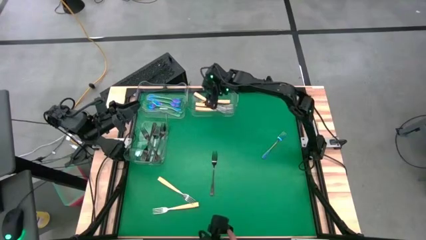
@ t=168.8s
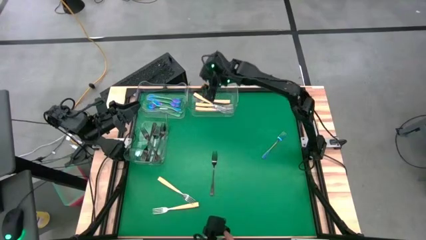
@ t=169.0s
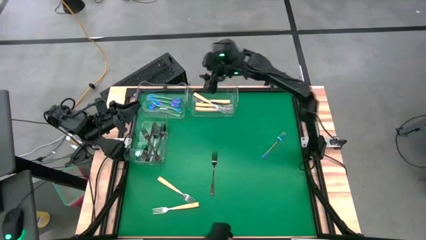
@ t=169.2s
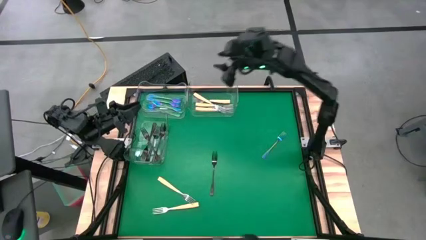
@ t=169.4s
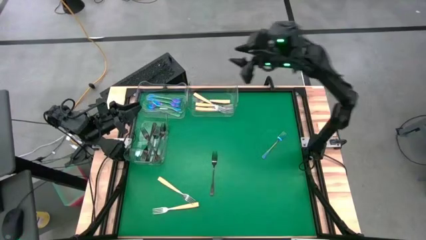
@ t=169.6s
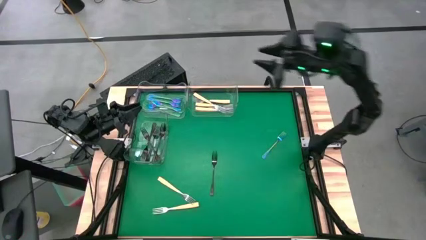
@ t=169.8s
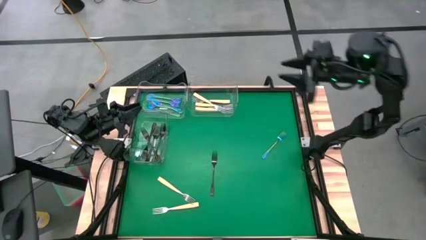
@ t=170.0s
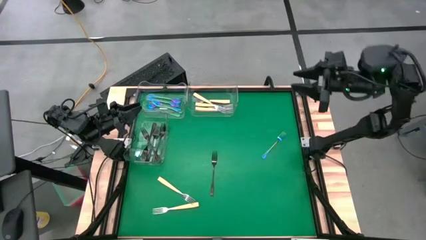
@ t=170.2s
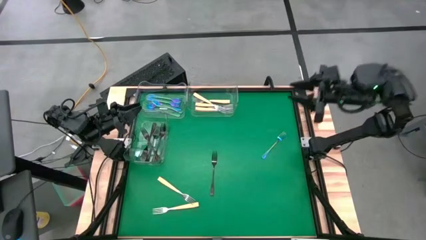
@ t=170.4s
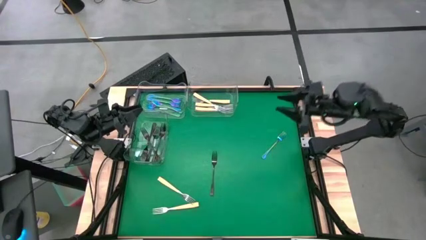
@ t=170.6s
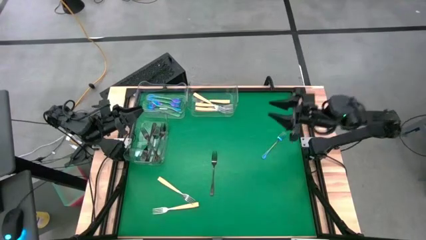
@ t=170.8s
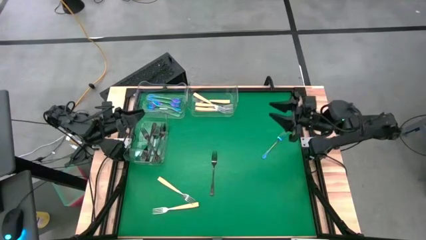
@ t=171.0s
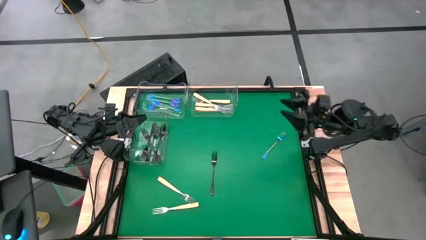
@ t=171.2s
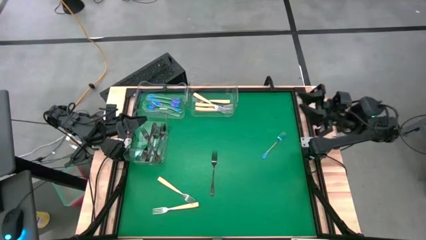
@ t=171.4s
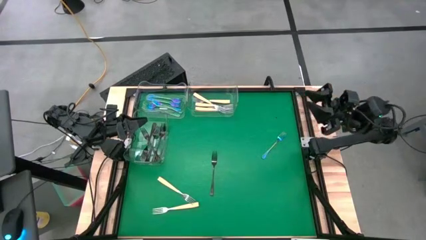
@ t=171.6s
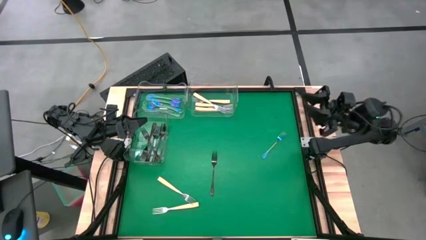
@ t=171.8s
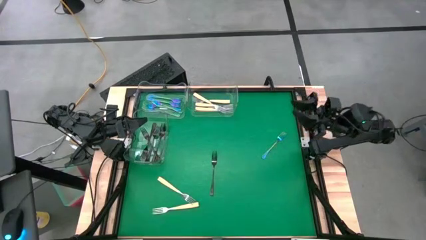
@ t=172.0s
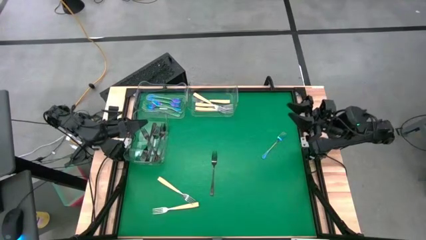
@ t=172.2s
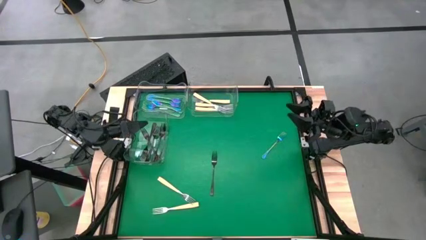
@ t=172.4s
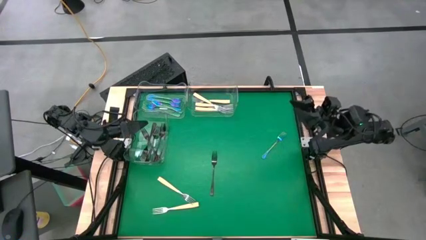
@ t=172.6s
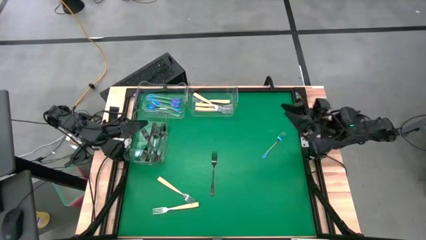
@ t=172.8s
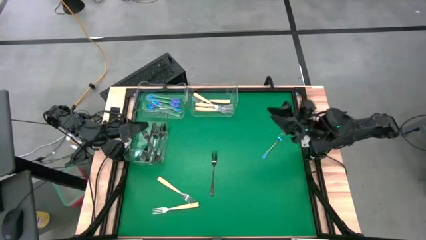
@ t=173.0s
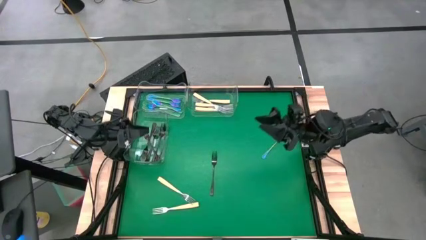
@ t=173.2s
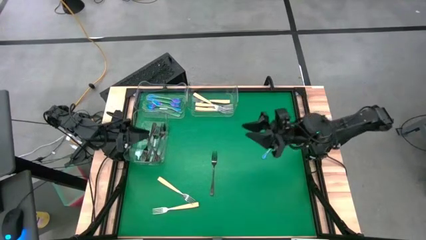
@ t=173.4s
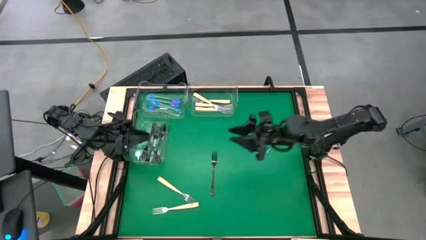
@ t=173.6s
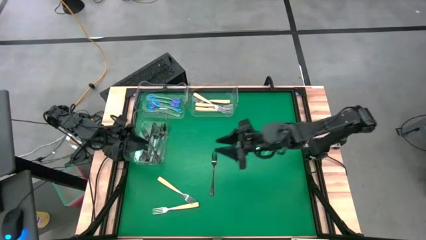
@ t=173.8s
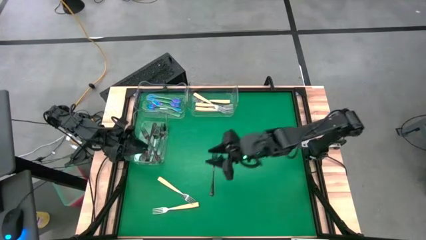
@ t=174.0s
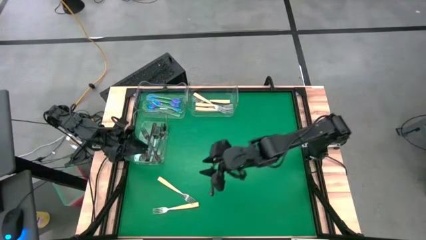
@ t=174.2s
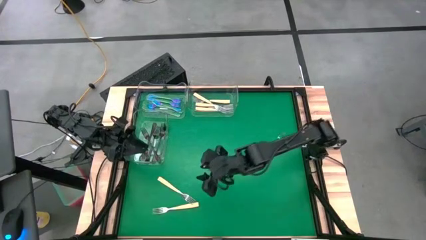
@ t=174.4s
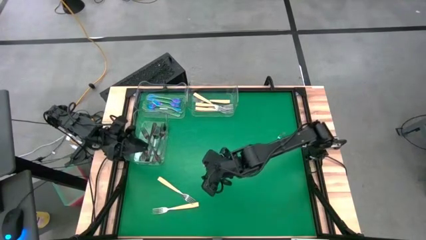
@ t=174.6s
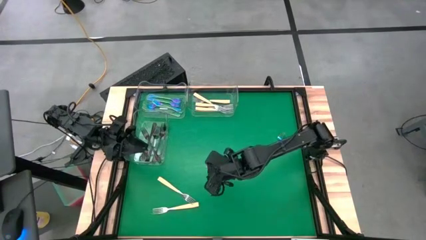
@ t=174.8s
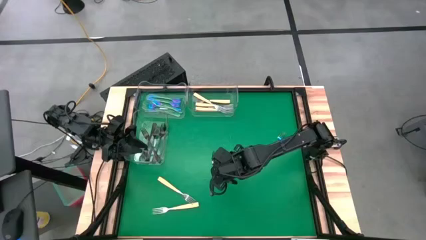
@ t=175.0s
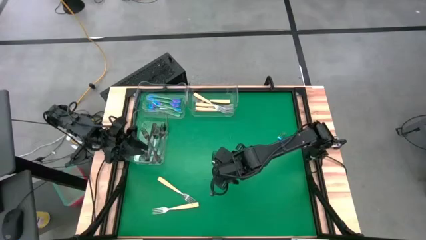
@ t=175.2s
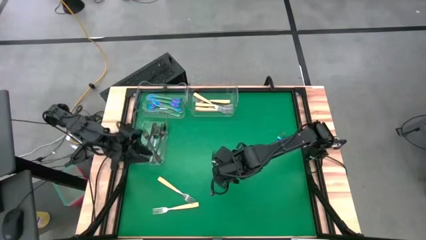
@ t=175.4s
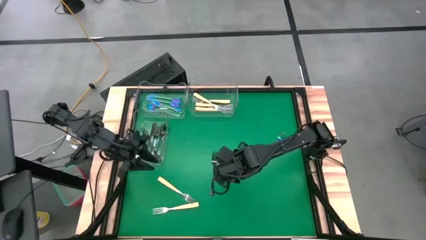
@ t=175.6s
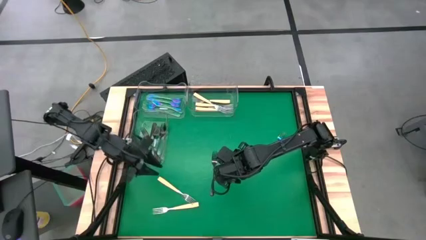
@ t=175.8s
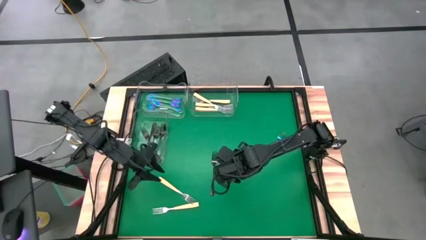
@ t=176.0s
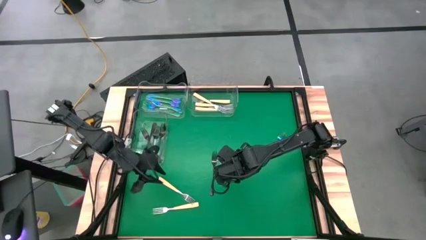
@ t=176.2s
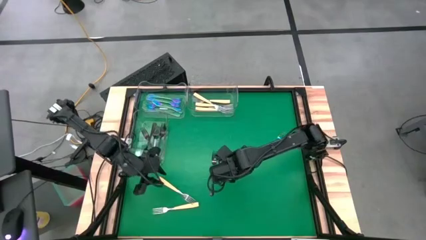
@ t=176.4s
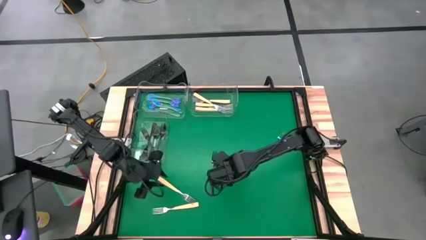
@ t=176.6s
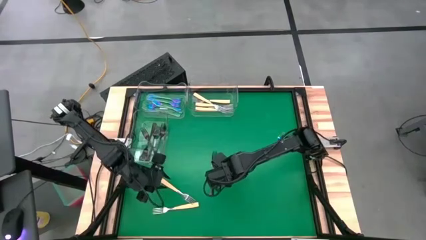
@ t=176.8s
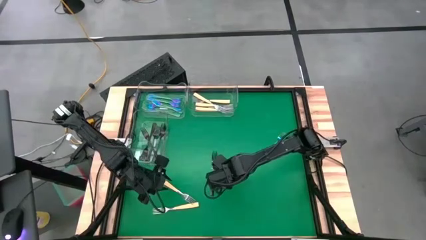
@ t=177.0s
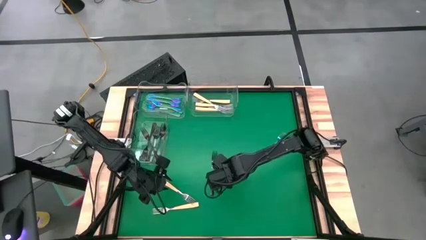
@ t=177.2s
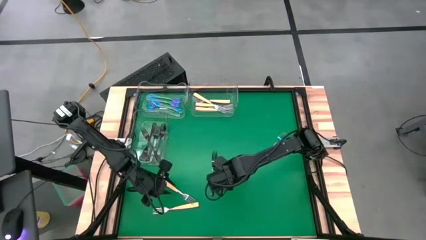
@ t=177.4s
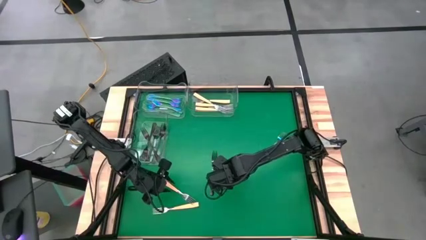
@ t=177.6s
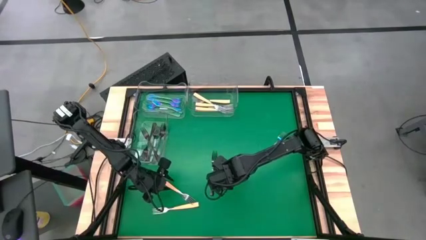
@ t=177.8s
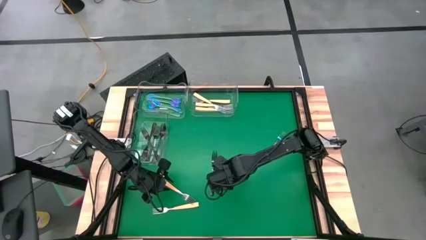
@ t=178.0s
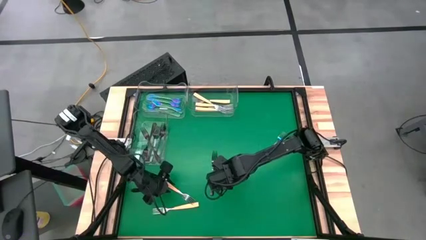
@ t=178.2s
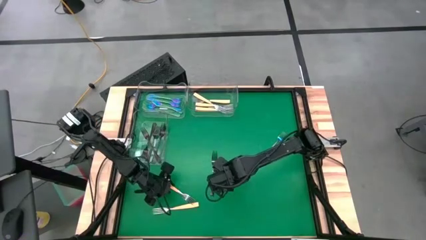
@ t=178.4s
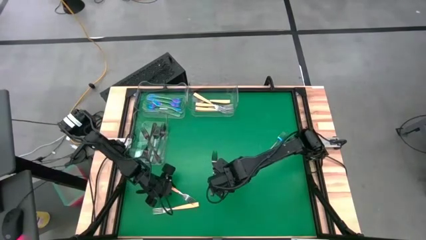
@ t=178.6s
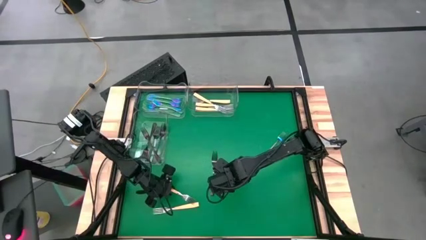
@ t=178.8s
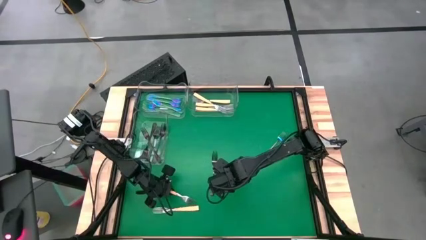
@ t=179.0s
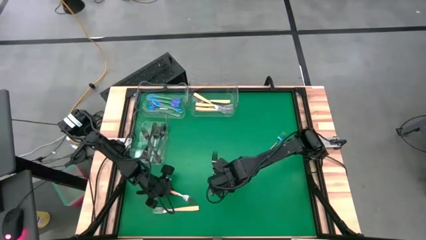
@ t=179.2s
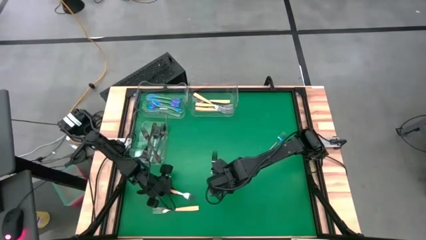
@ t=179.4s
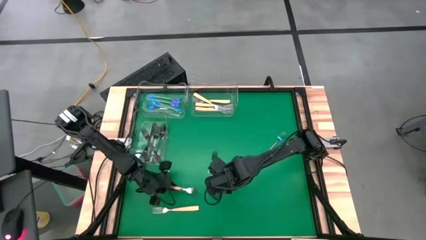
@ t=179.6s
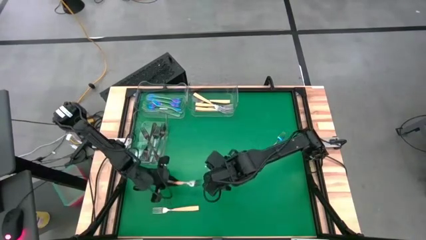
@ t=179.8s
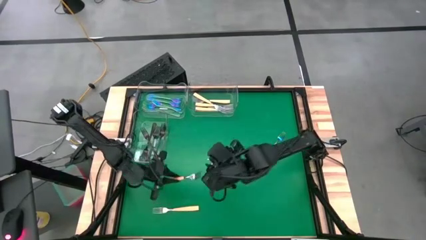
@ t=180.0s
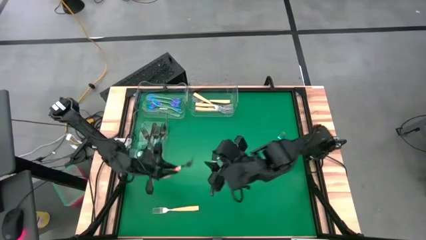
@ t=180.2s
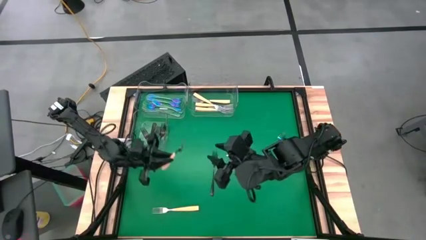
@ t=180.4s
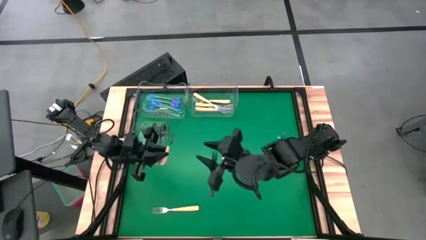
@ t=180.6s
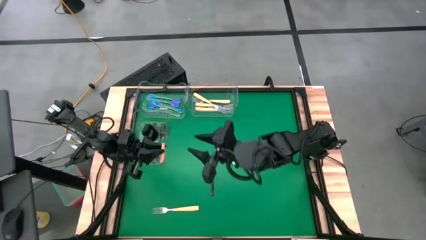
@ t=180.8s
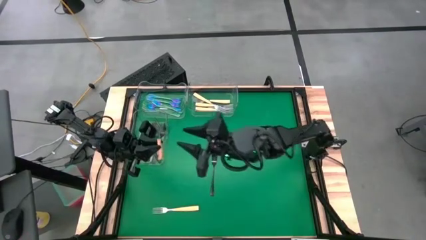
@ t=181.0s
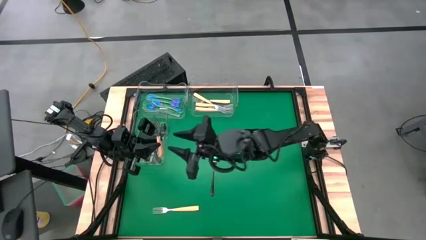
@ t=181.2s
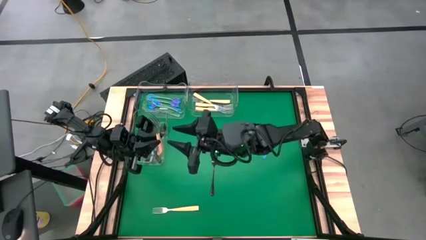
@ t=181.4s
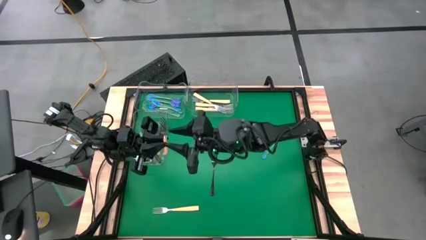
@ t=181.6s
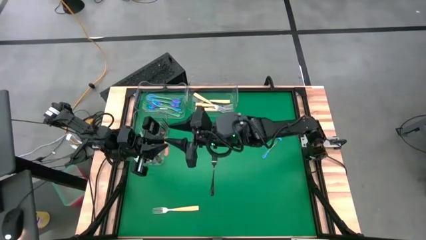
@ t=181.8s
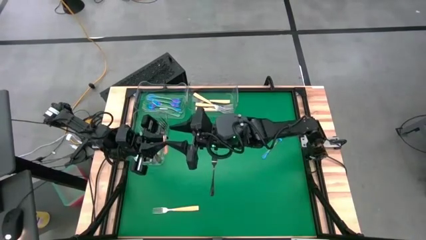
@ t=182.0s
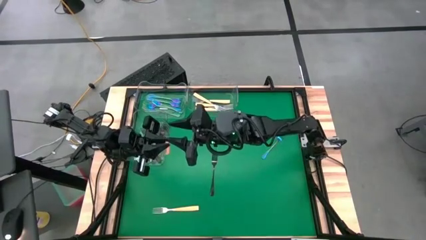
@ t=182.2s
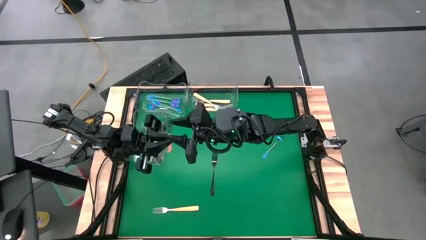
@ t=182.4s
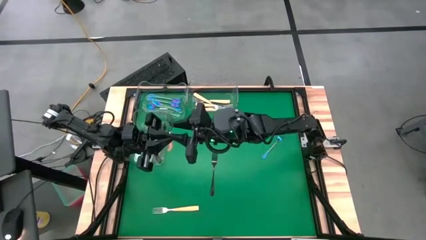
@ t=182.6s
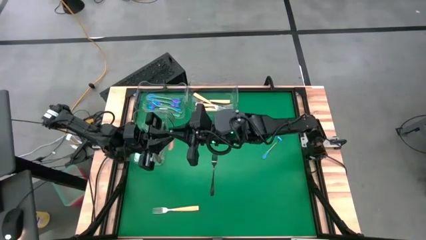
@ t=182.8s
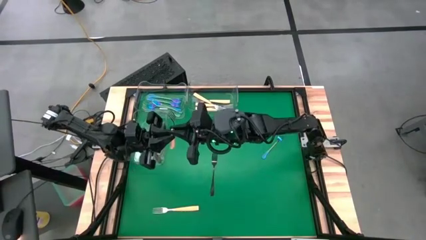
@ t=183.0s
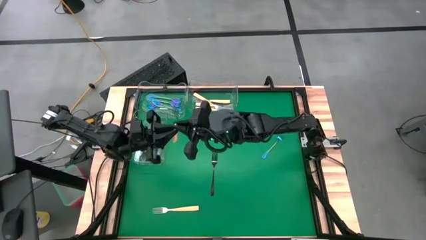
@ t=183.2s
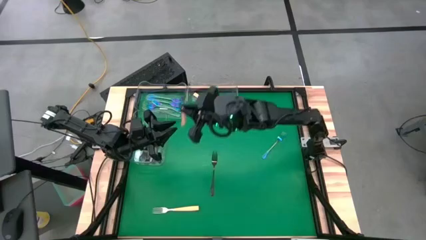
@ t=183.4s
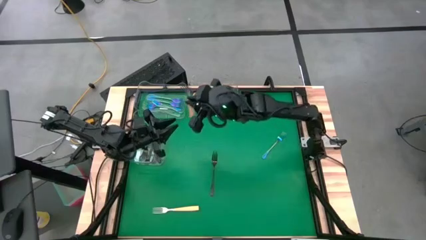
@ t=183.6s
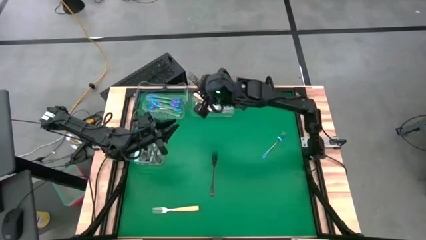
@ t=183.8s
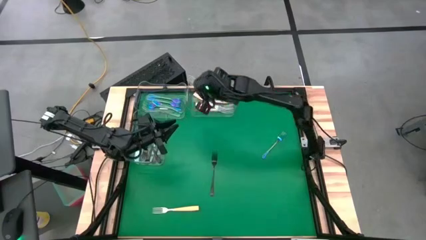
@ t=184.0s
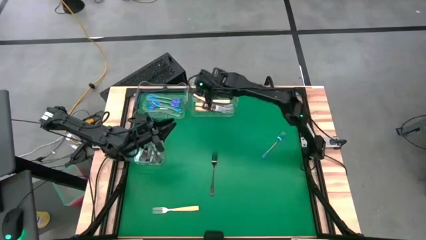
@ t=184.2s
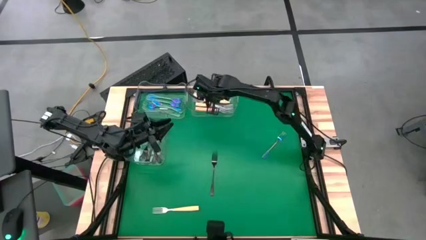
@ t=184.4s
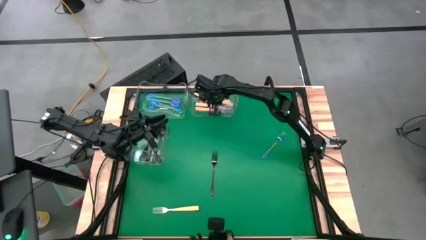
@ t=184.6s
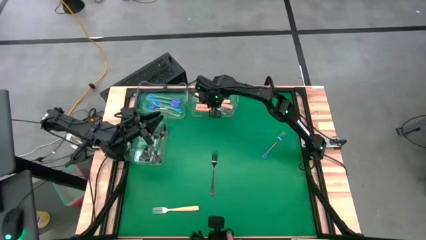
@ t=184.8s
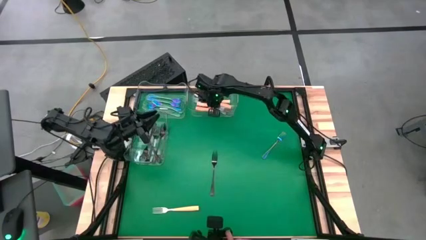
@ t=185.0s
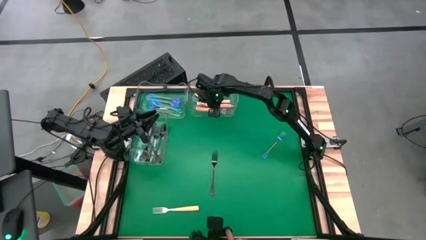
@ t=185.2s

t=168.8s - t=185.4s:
Task: Sort silverware by color (type)
Put the yellow fork into the top right transparent bin
